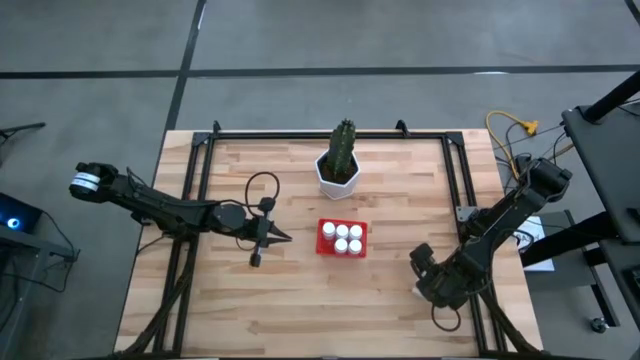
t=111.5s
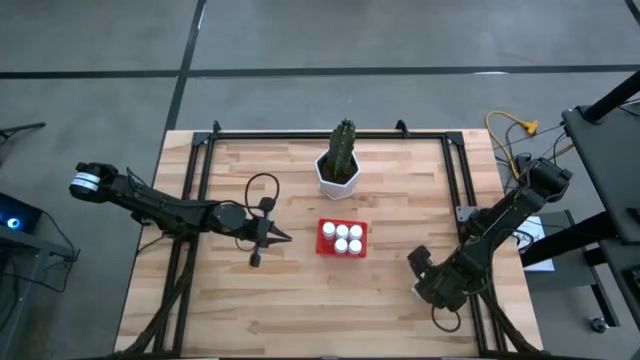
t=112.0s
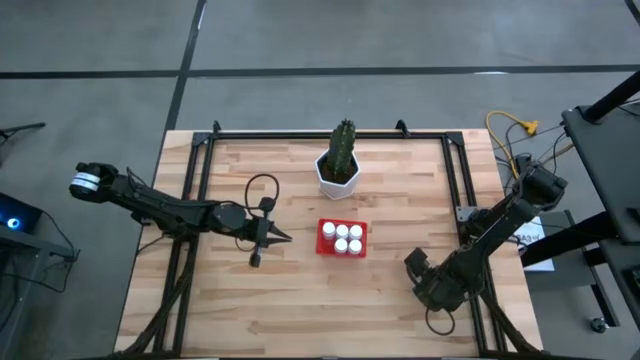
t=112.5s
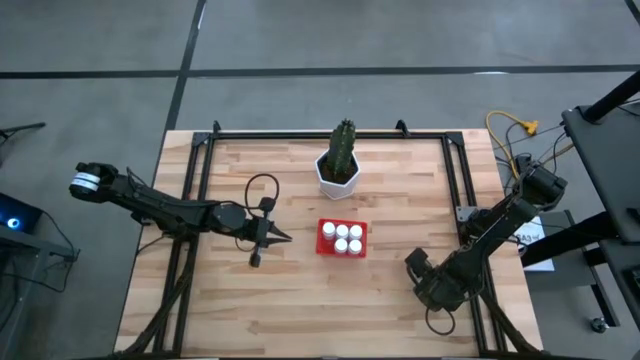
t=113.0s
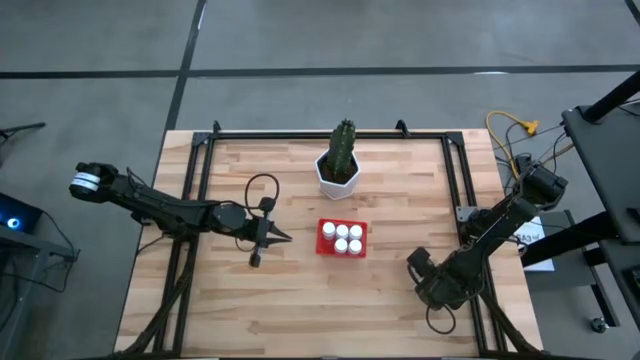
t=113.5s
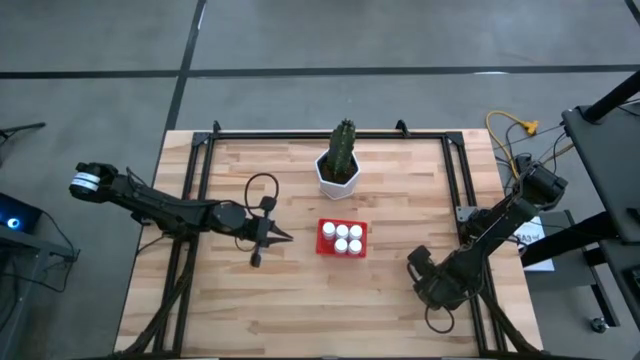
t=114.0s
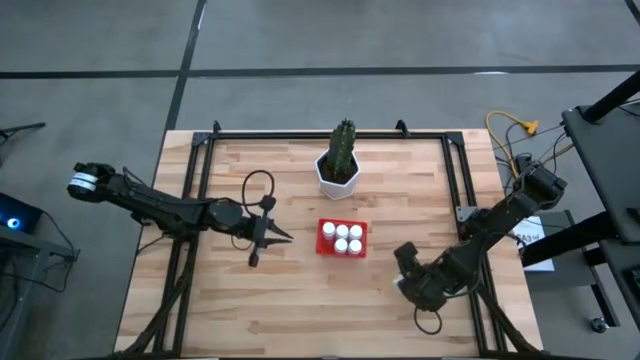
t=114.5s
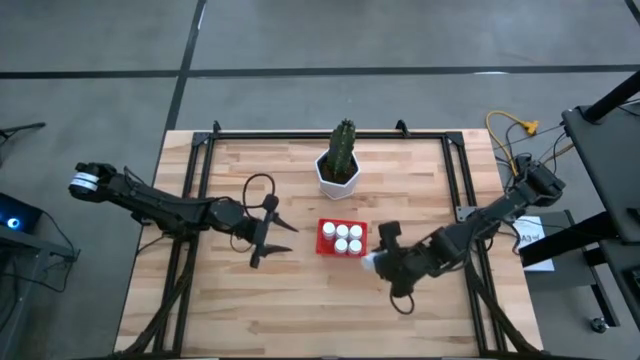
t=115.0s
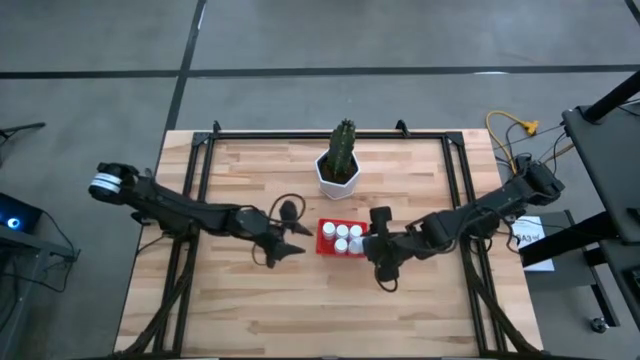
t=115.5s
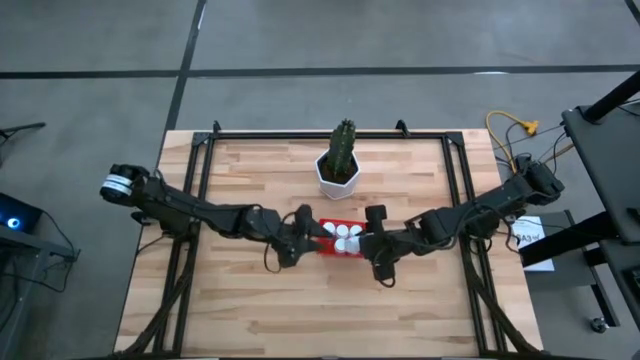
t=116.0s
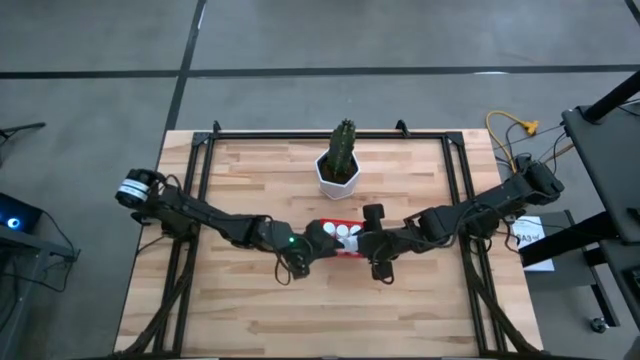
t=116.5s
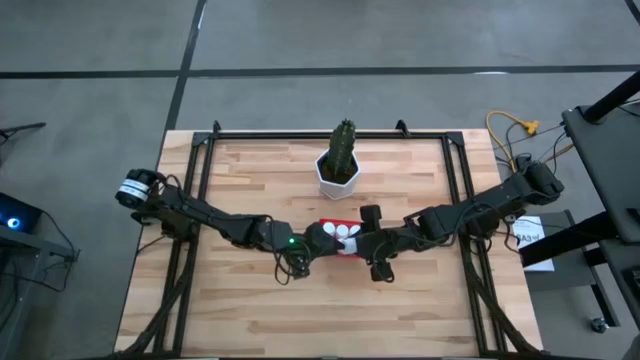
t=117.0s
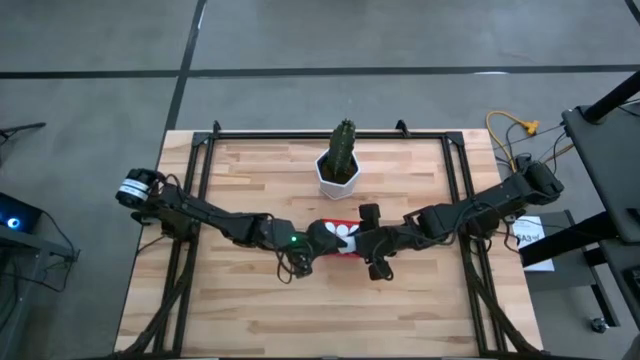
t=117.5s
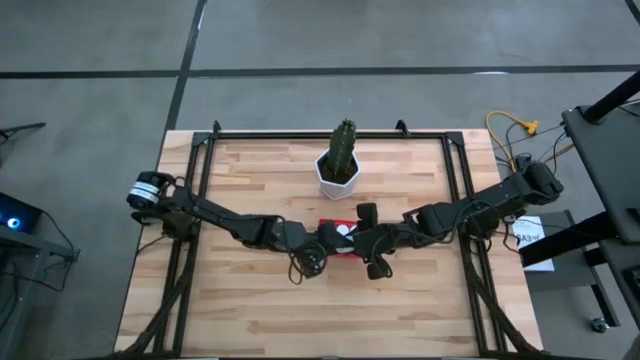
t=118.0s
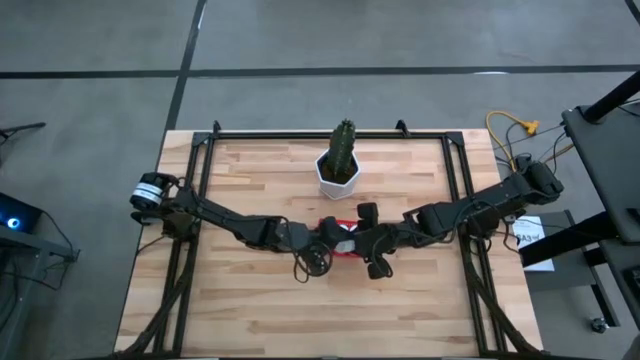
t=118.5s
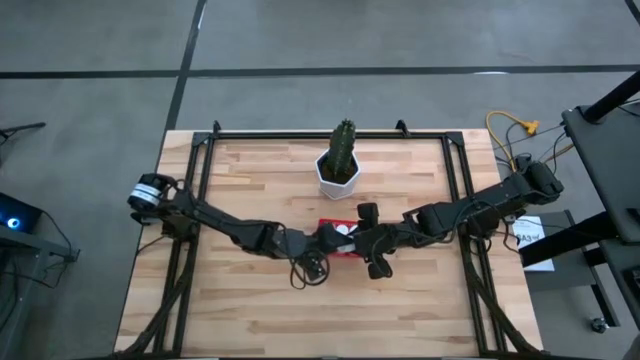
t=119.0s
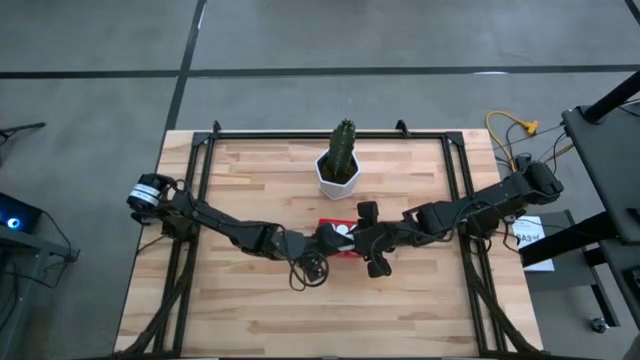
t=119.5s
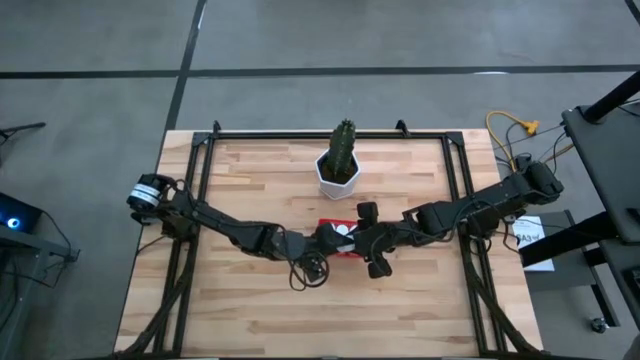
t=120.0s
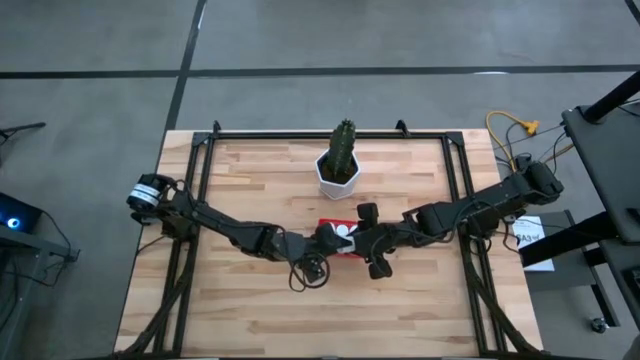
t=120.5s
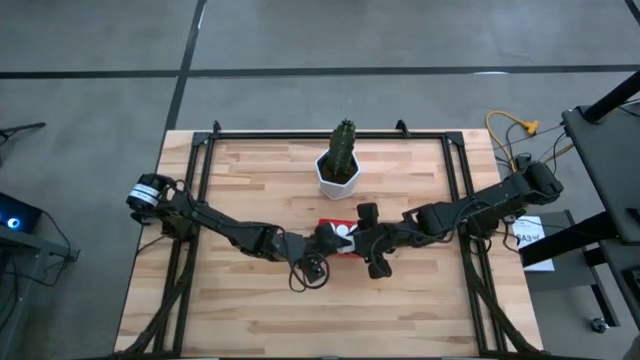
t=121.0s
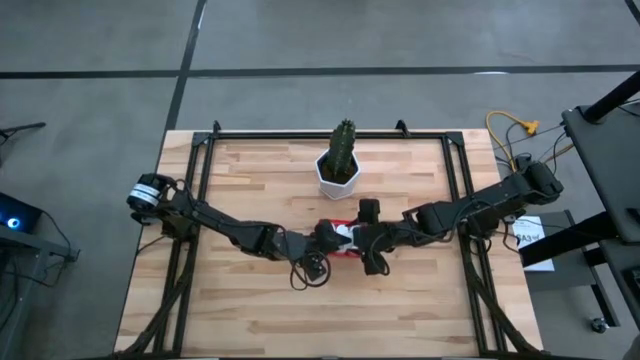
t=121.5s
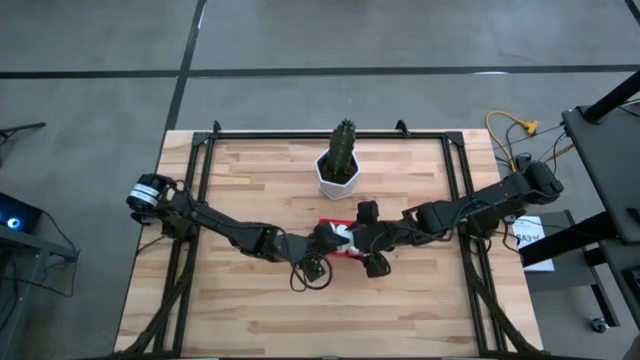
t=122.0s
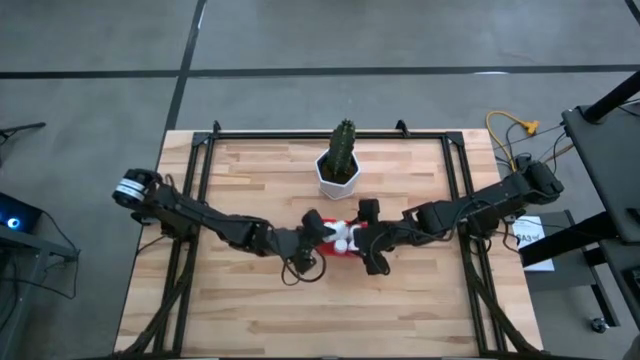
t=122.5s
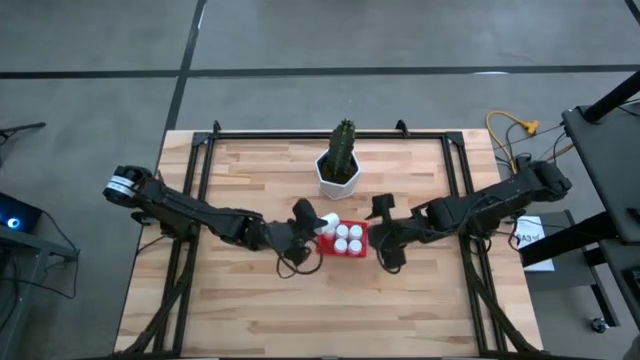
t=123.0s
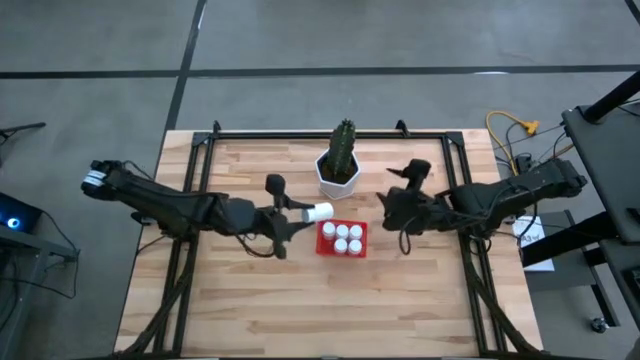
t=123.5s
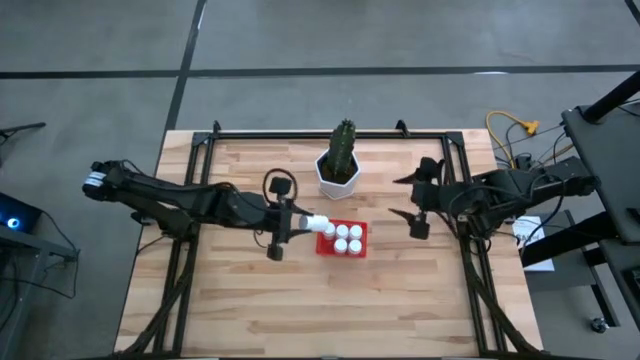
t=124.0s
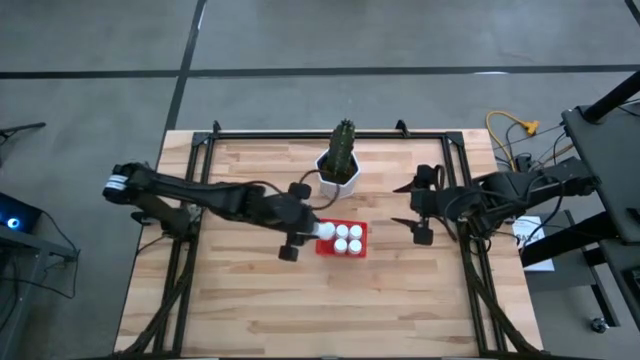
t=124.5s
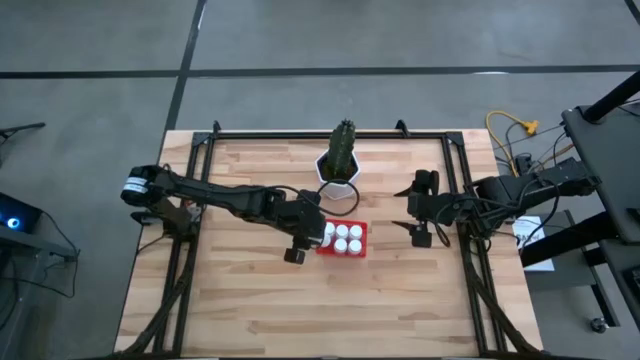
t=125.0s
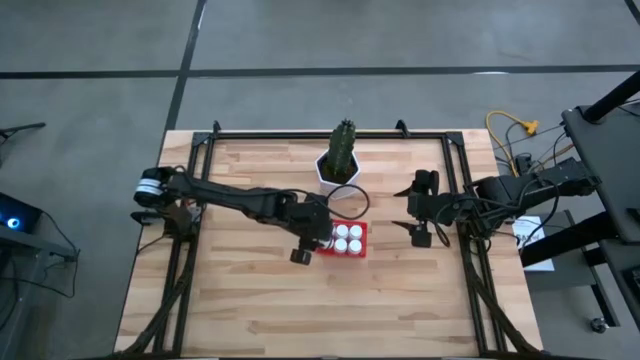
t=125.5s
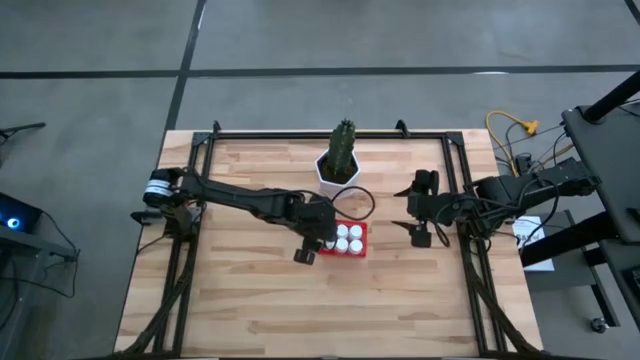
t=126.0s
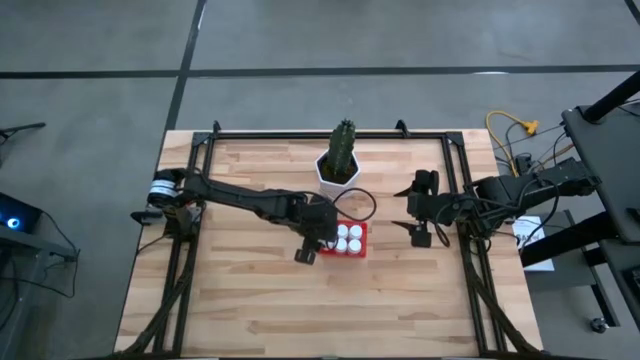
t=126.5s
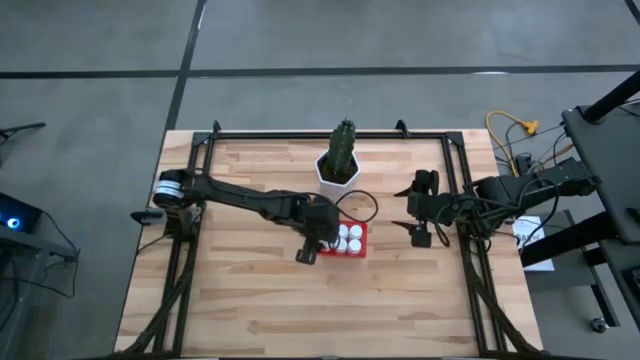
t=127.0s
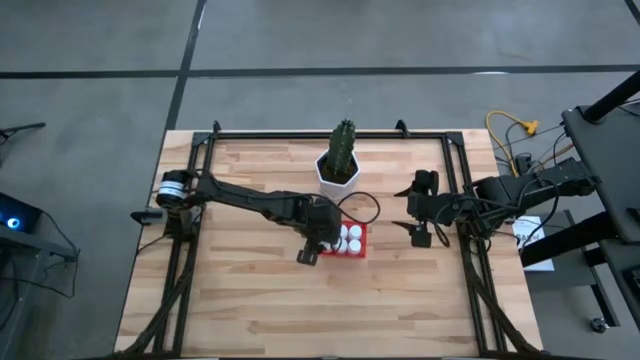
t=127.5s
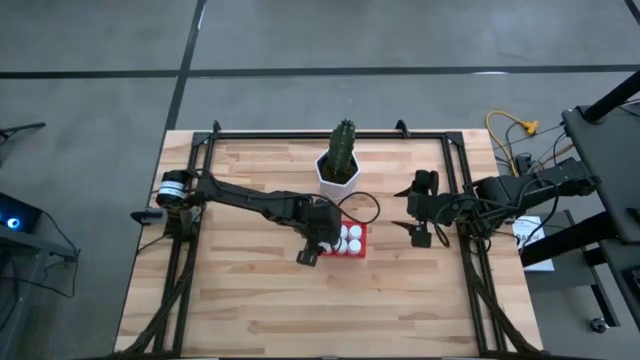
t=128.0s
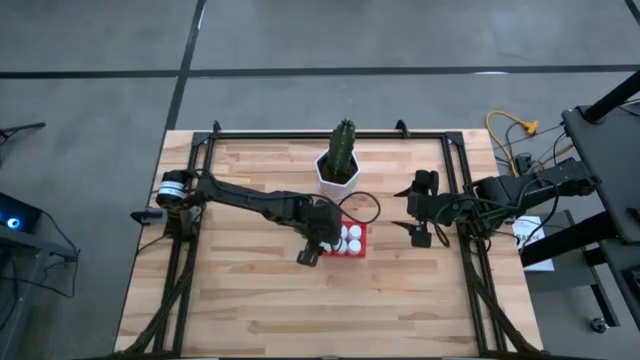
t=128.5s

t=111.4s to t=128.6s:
Task: Pick and place pill bottles into a basket
Put the white pill bottle into the red bin

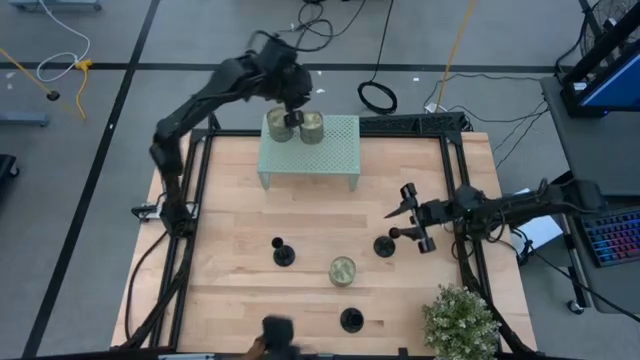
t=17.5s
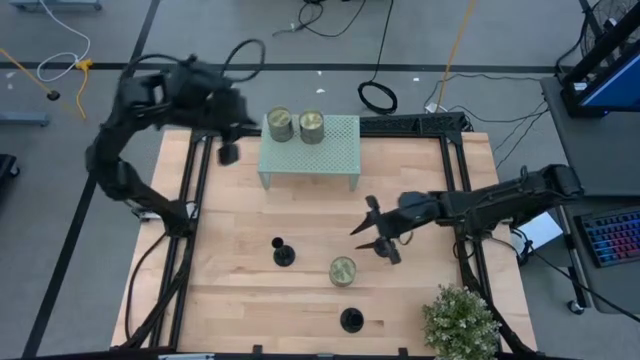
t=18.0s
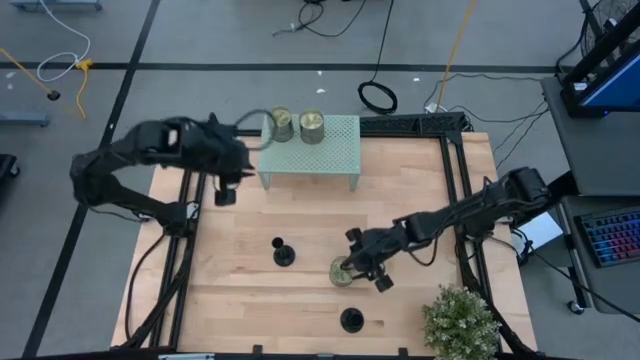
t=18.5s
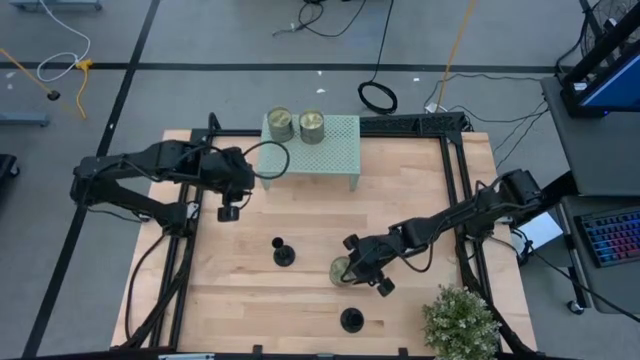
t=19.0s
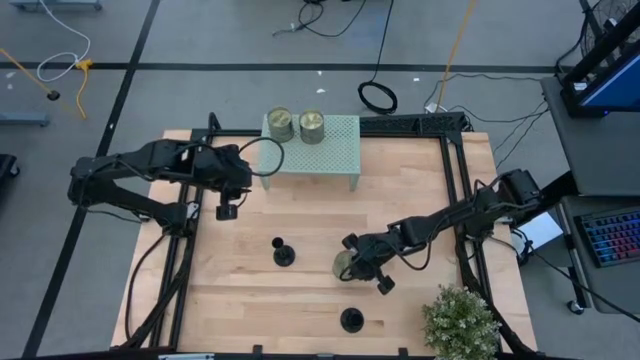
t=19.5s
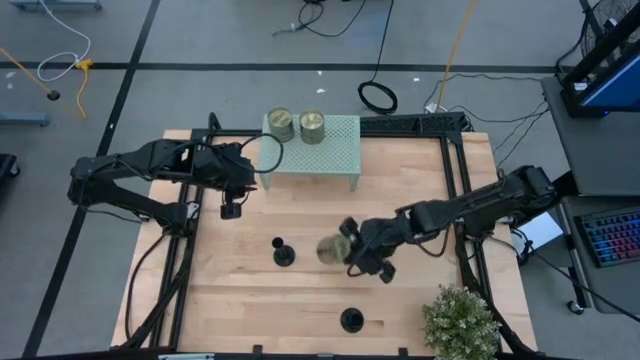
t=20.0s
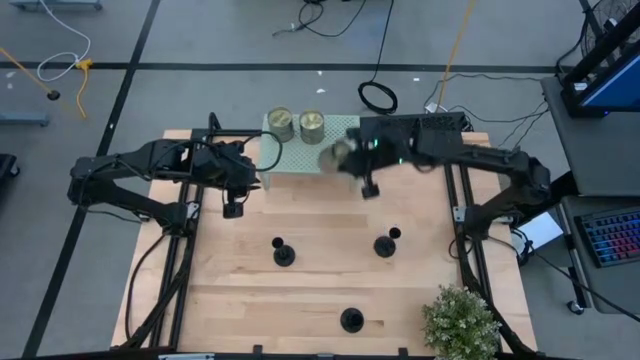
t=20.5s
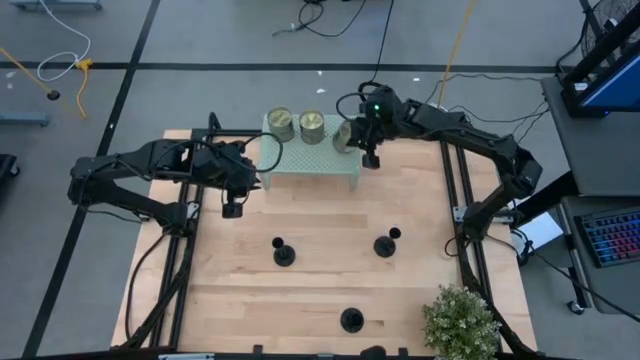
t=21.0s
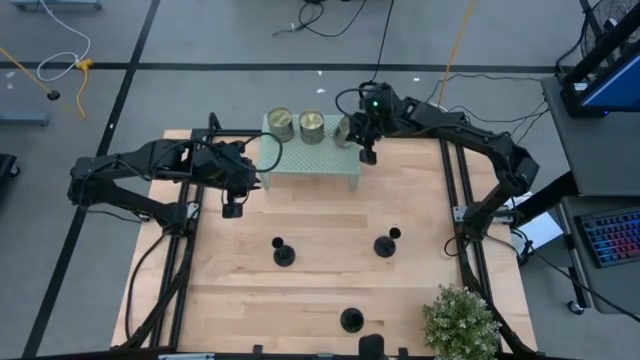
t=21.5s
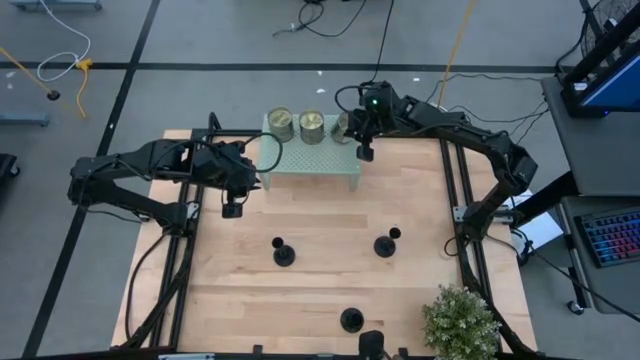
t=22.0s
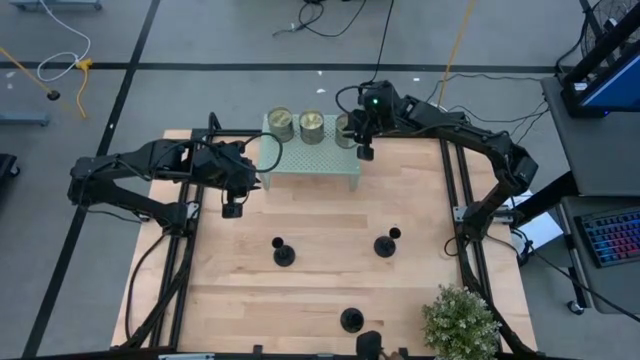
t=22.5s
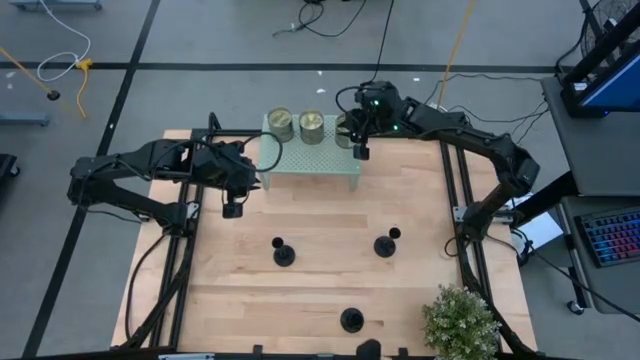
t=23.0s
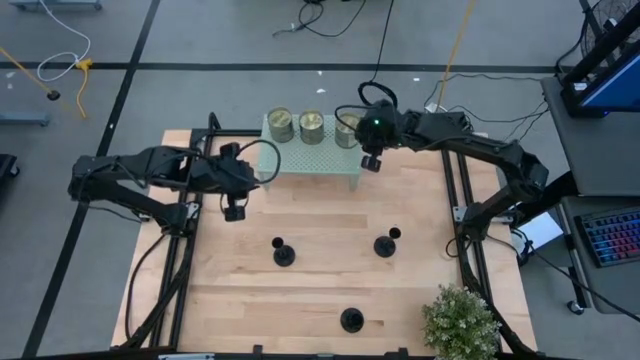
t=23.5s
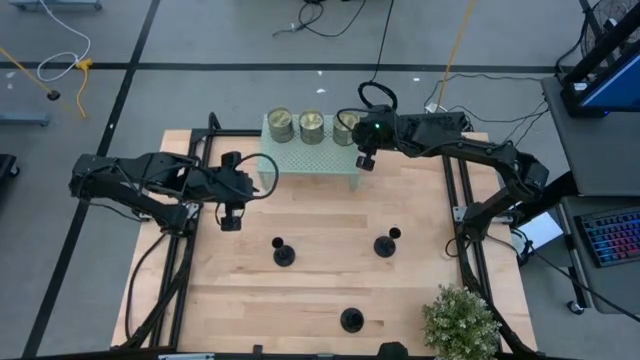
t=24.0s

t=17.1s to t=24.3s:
Task: Pick & Place candle stick holders
Put the scented candle on the shelf
